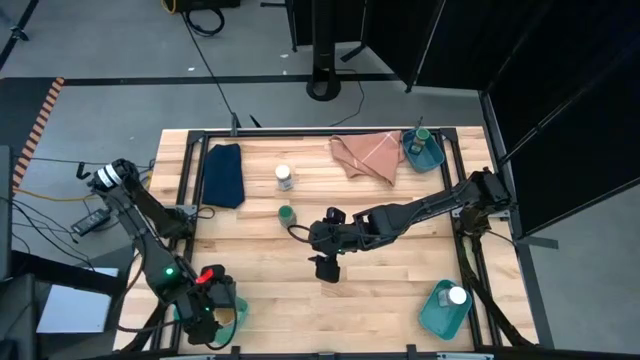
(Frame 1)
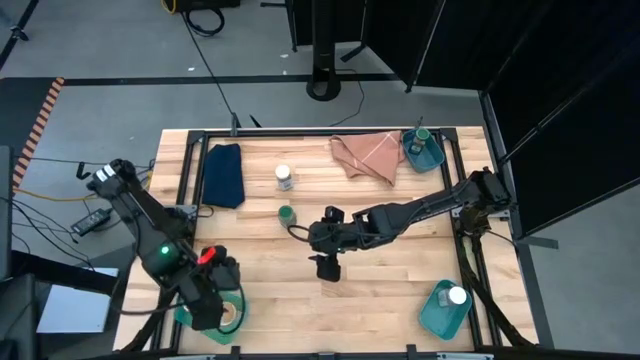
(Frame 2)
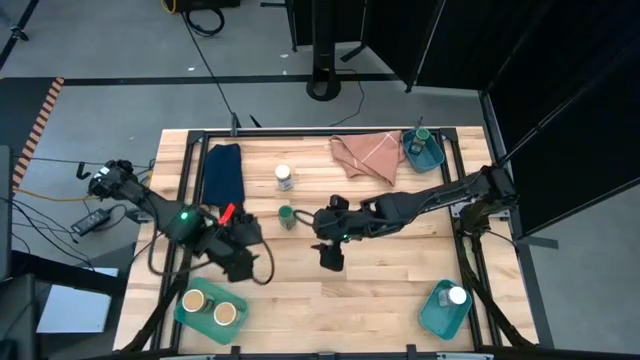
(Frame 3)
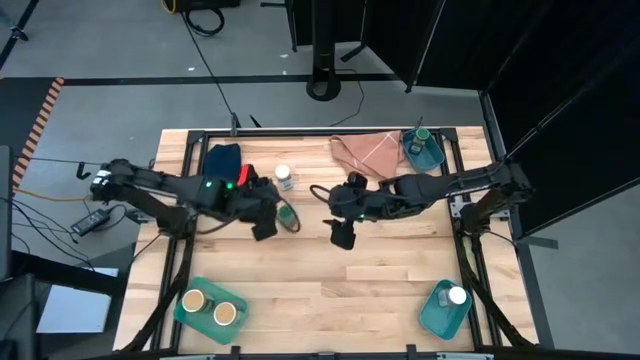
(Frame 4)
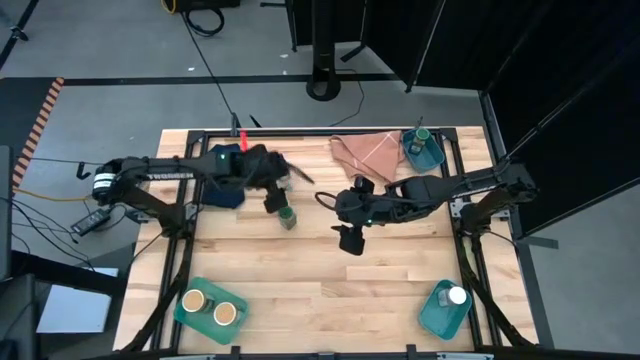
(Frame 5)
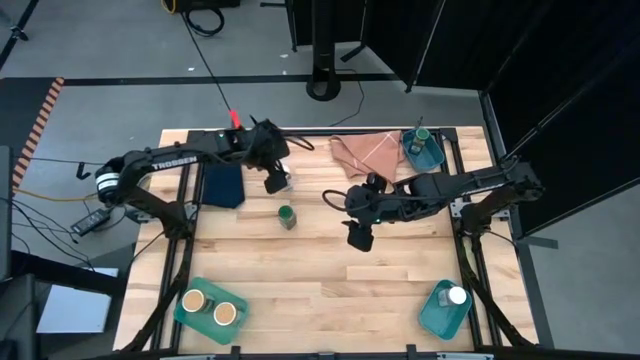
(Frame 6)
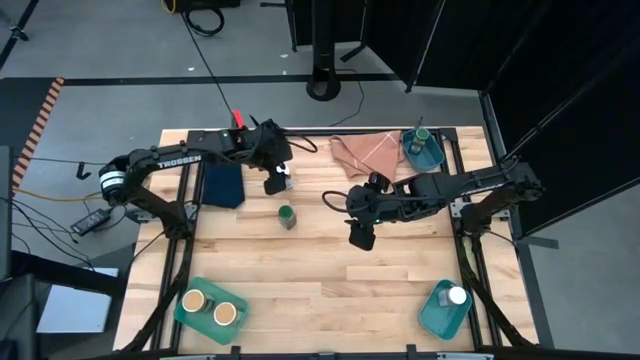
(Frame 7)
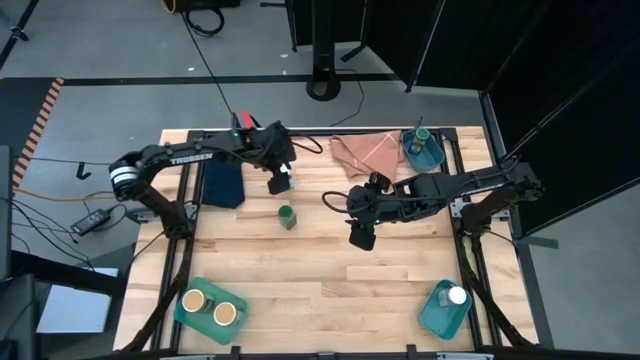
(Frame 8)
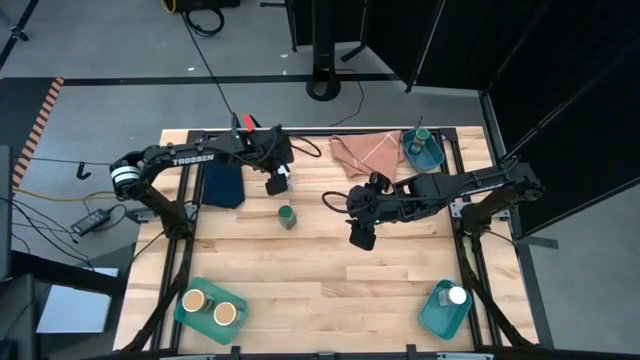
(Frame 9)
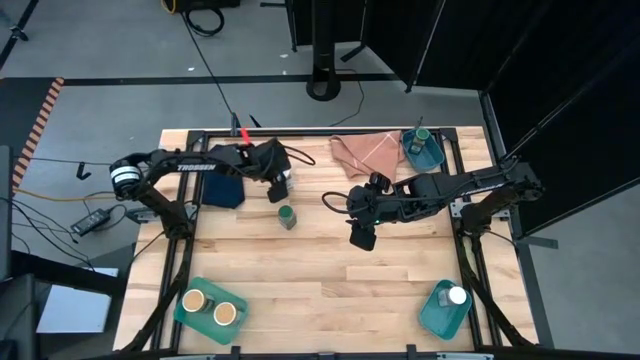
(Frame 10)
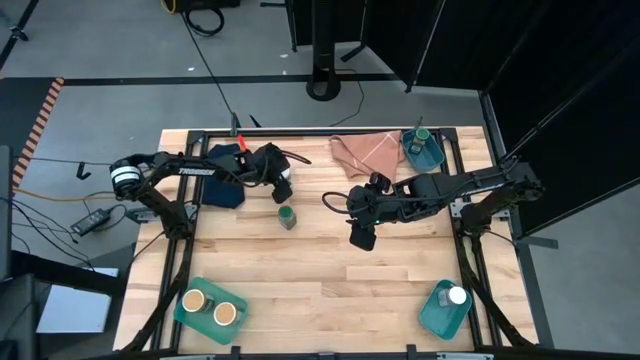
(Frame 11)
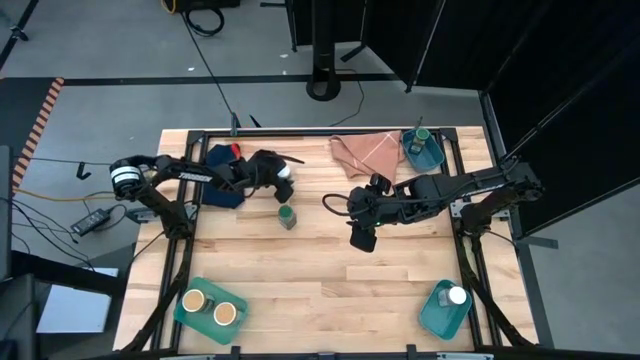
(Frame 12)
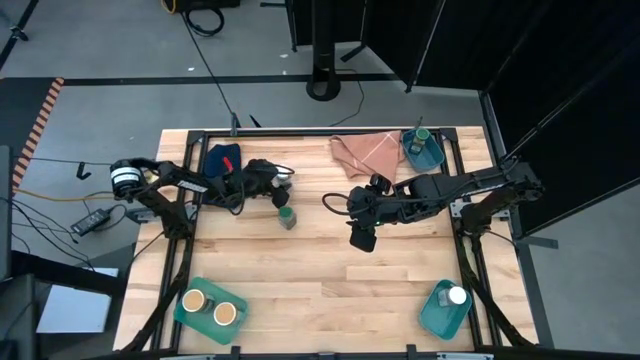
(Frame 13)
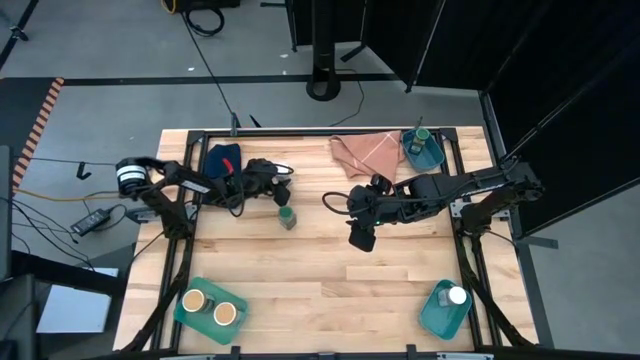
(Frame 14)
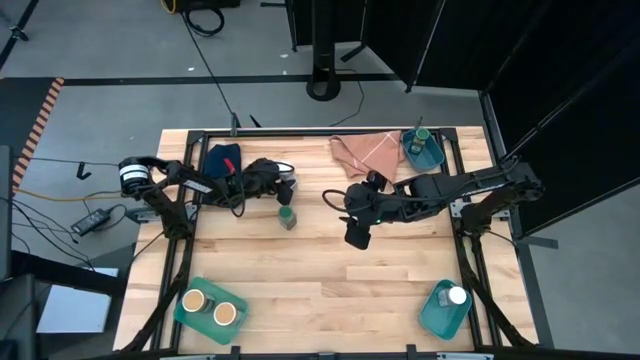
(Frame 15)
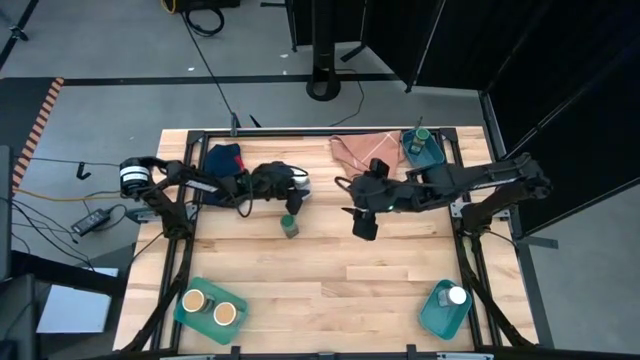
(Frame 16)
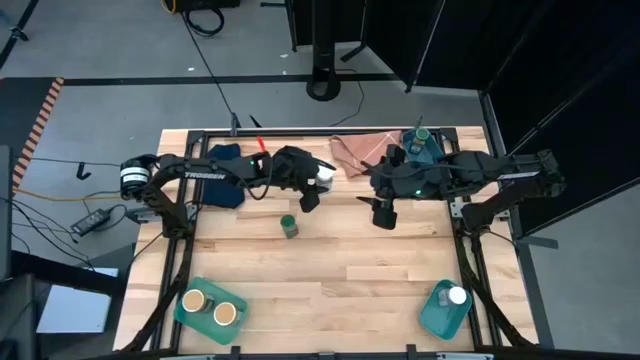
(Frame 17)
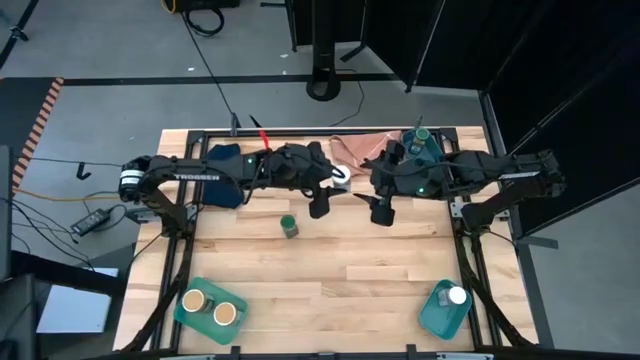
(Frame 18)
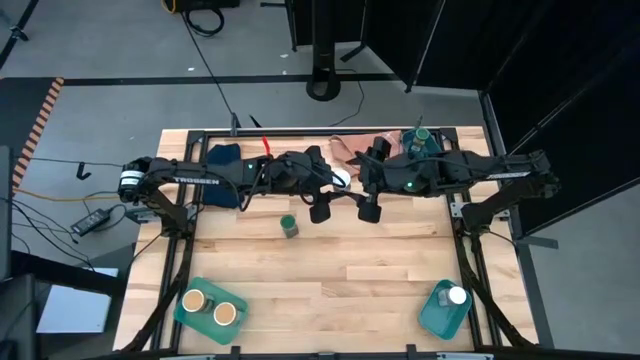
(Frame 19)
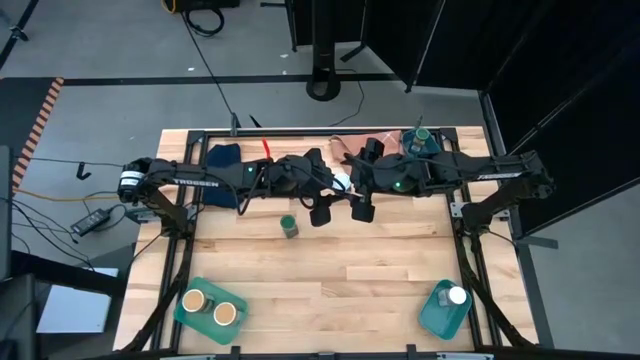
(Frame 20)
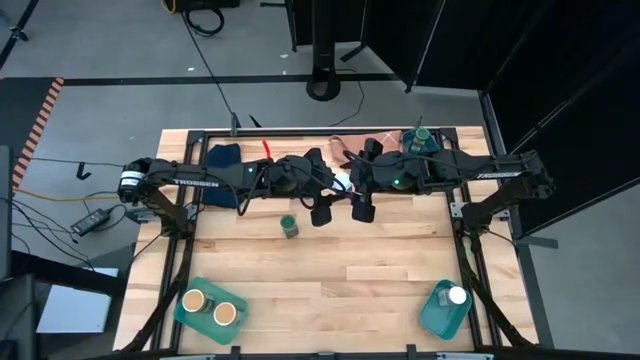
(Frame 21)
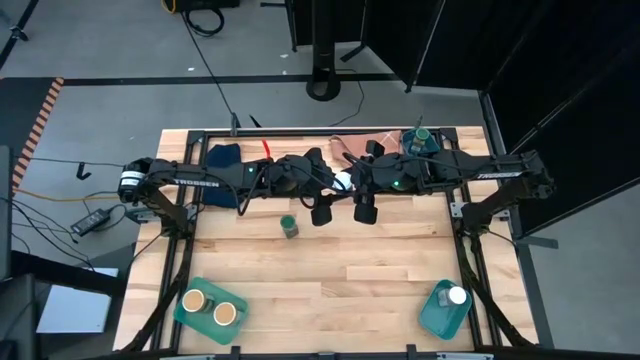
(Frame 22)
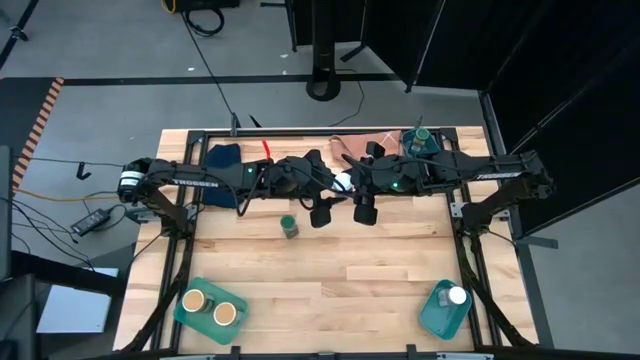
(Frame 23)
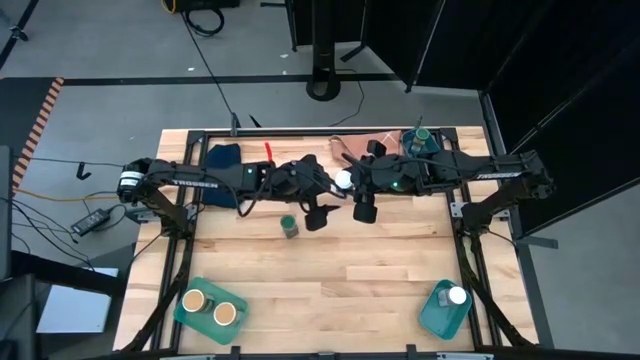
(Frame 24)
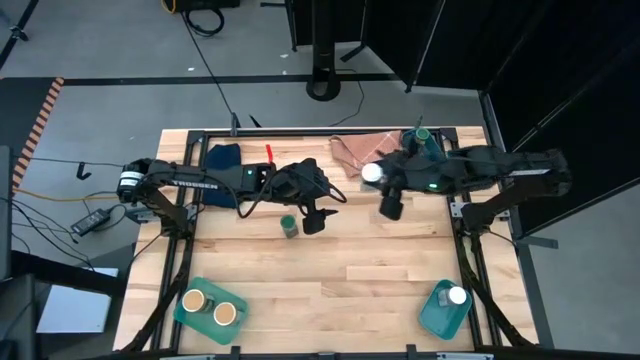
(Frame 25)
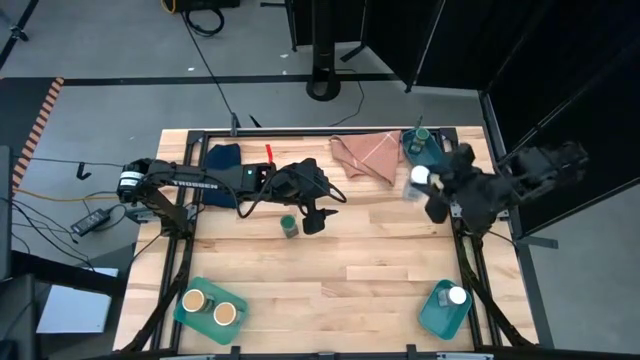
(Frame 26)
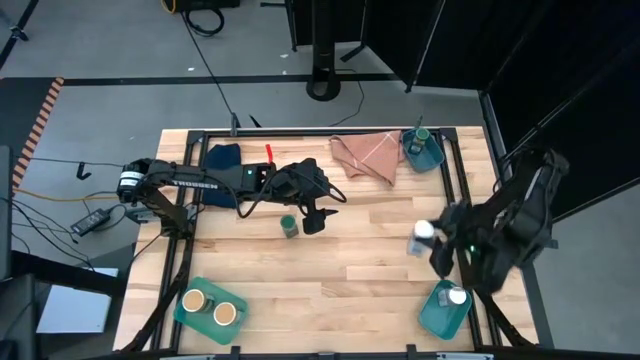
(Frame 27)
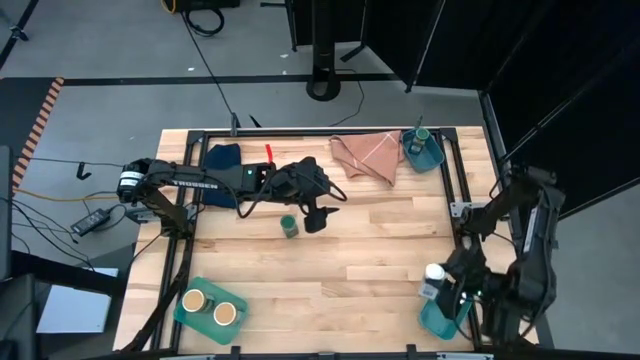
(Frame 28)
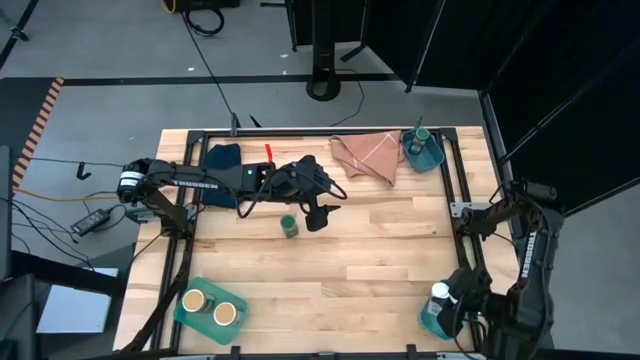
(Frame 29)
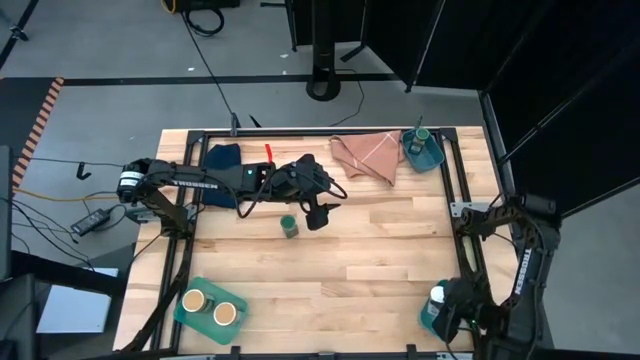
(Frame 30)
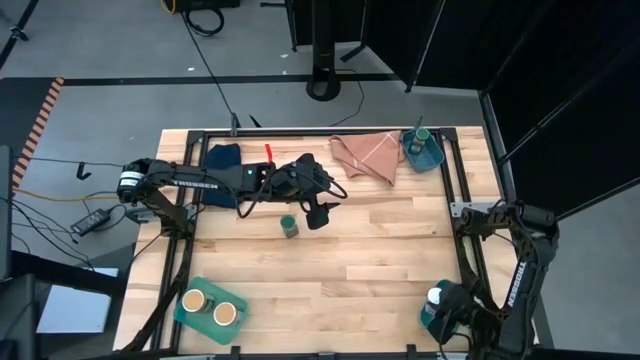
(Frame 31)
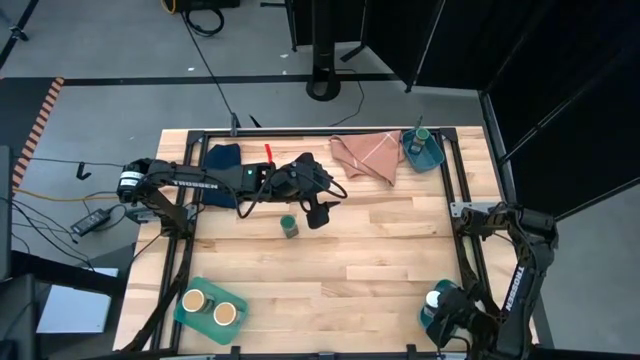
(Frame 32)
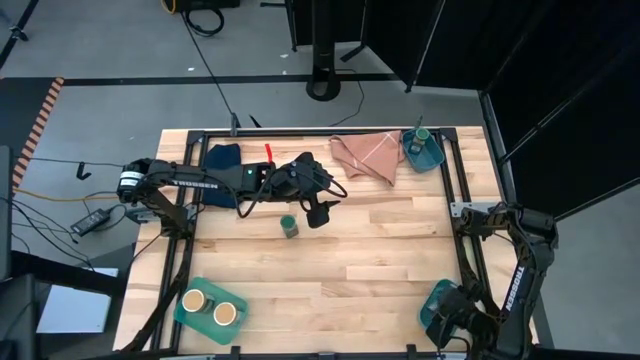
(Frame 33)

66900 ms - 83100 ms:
Task: Sort spices by type
Put the white seasoning bottle into the green bin
